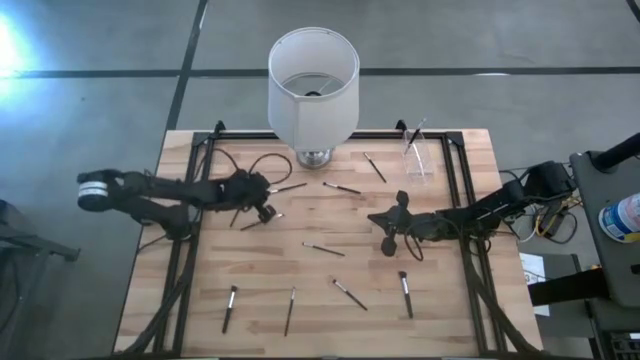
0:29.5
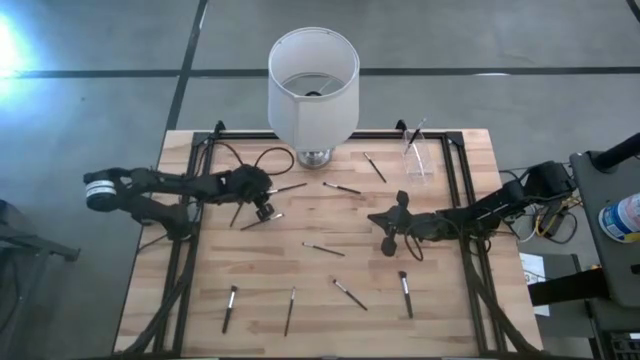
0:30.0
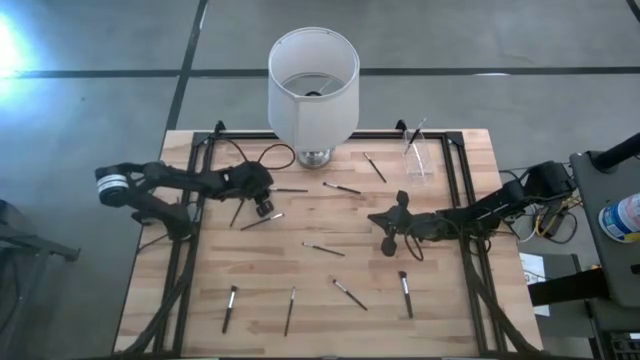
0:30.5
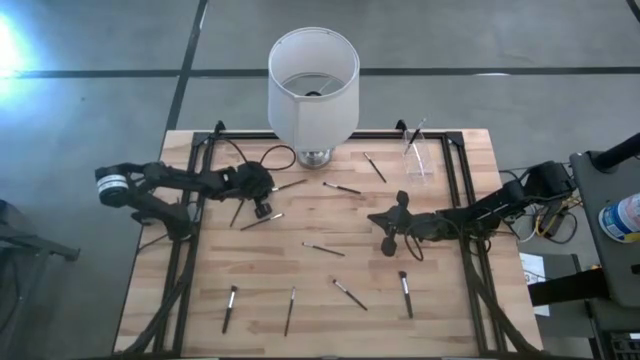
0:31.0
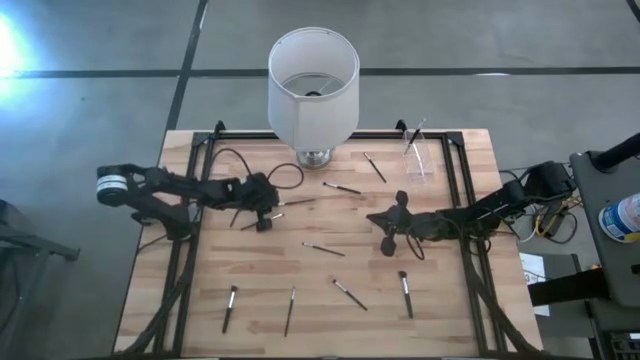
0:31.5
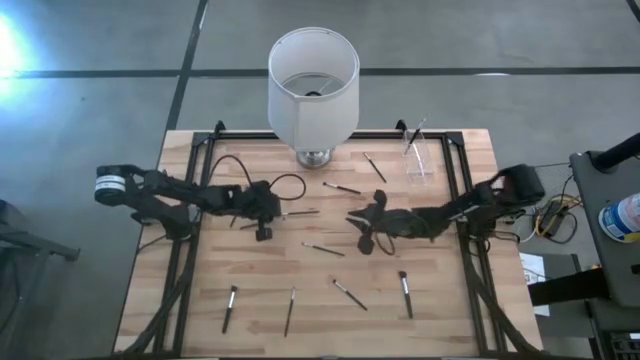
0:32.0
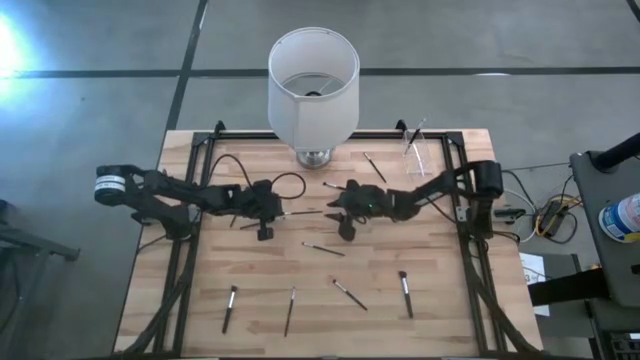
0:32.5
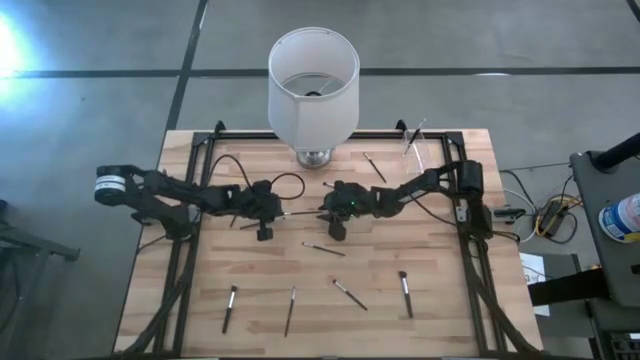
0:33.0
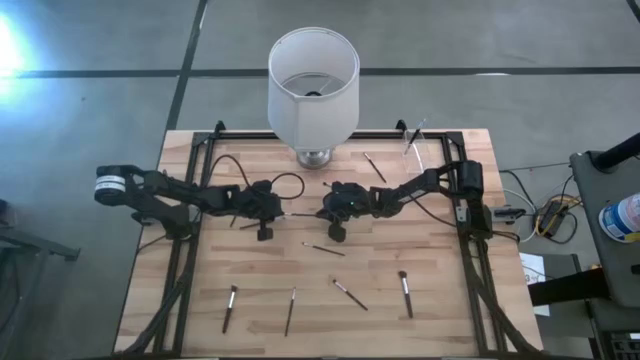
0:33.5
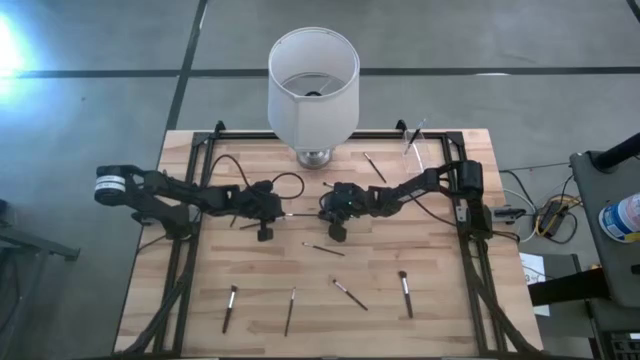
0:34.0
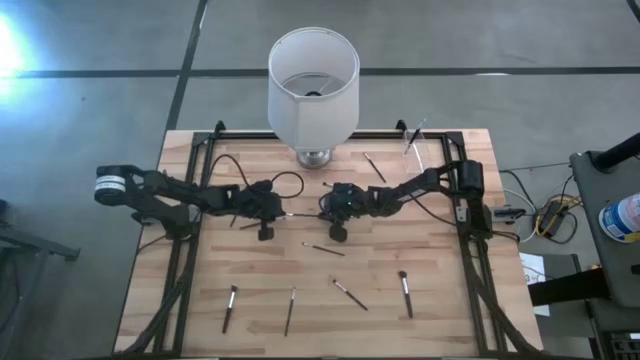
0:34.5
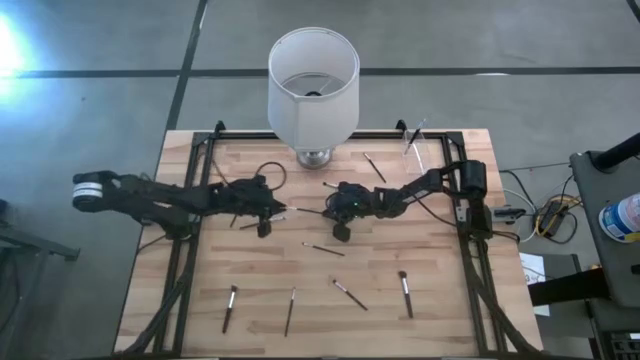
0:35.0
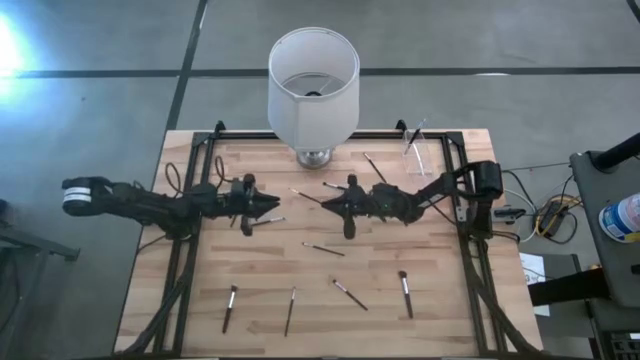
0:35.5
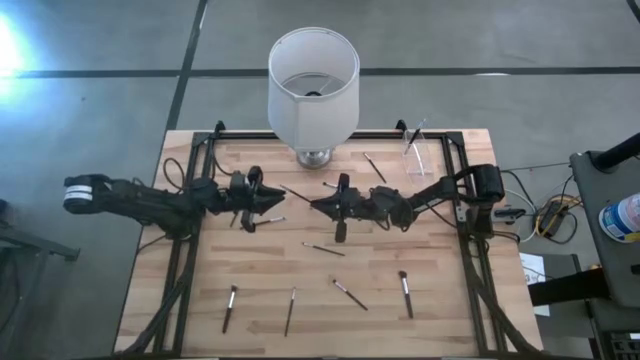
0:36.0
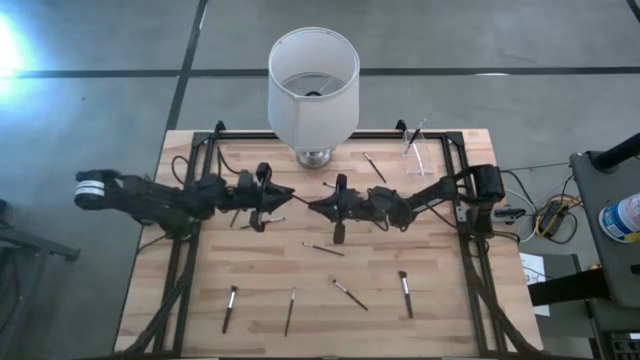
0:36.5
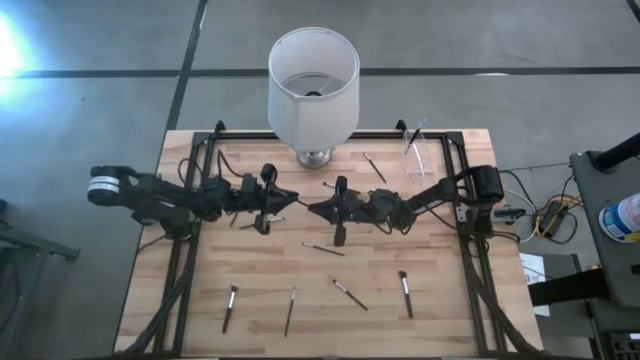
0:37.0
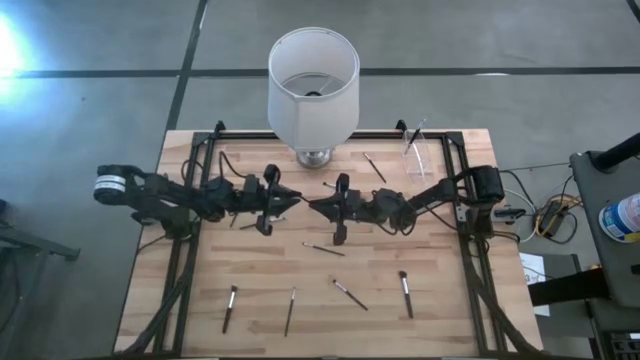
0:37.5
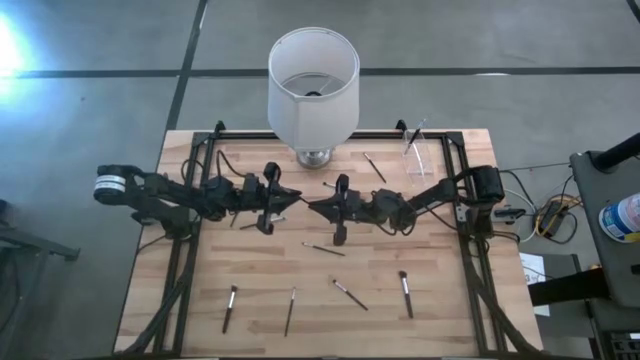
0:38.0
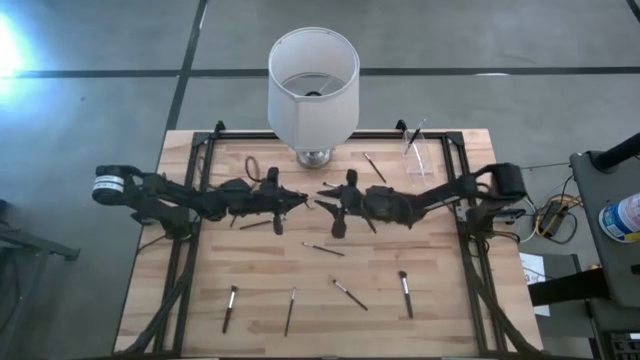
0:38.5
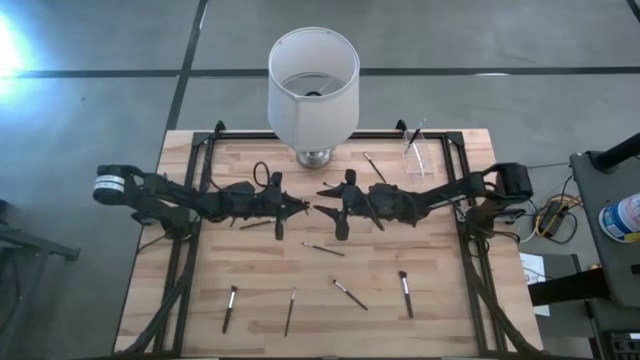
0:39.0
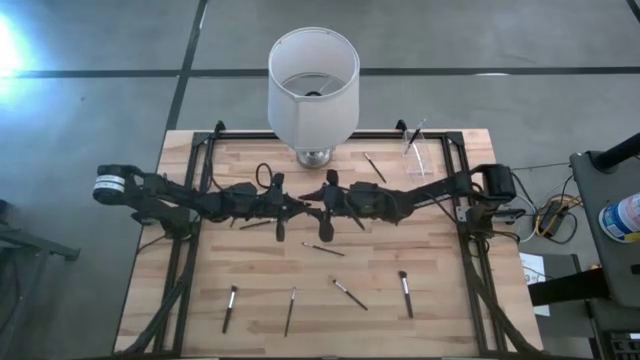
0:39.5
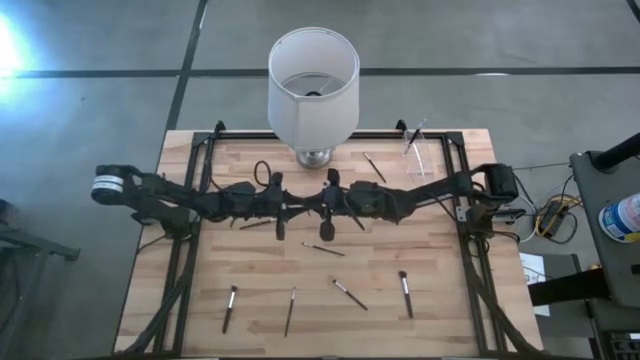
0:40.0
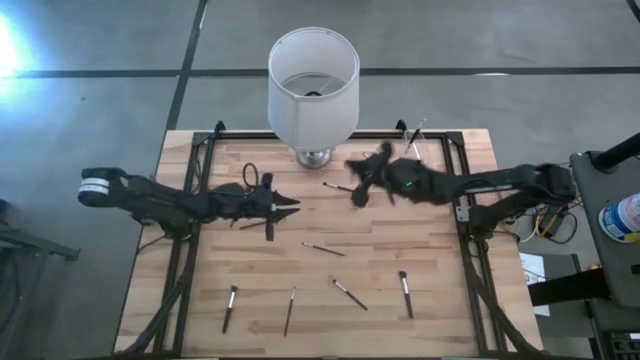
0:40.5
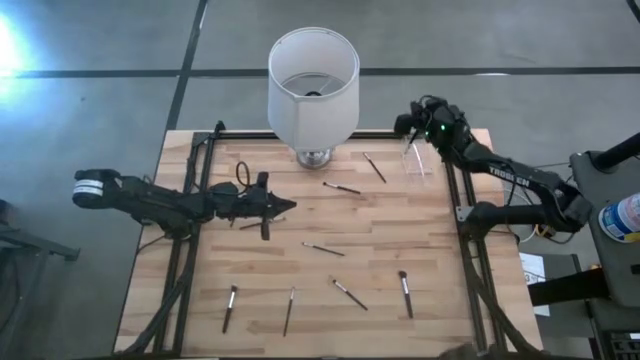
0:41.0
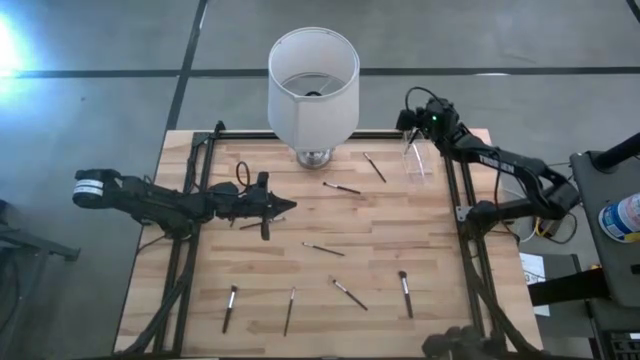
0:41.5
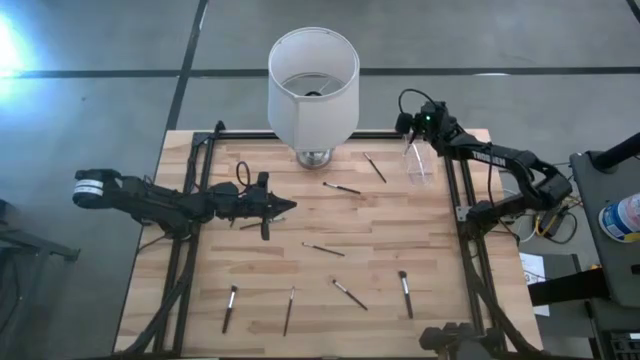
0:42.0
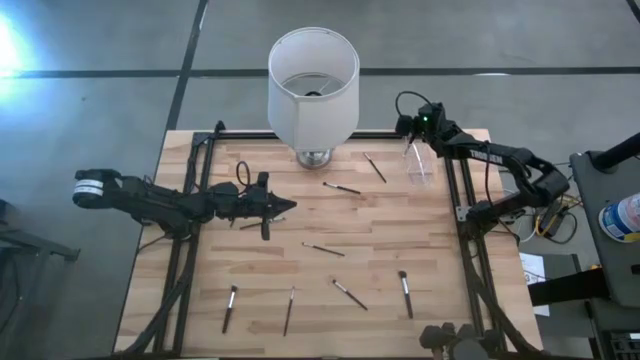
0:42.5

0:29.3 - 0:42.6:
Task: Put items in baskets/containers
Put the eyeshadow brush into the transparent organizer

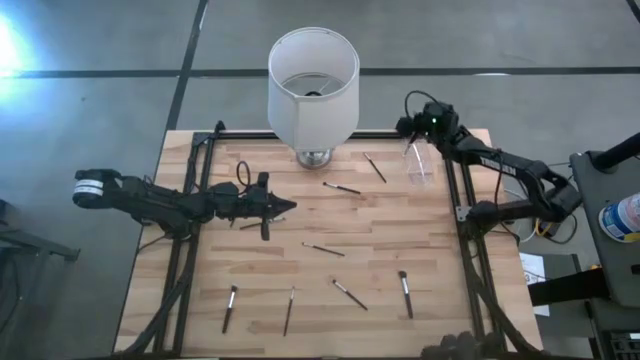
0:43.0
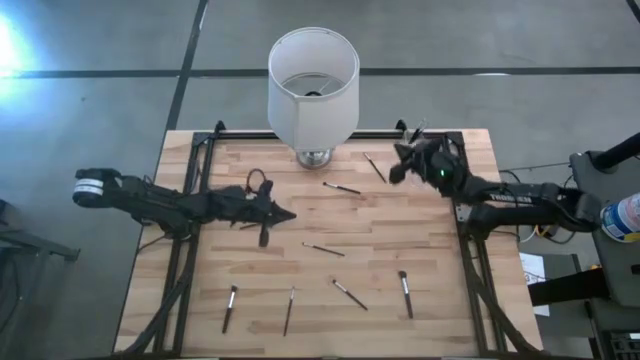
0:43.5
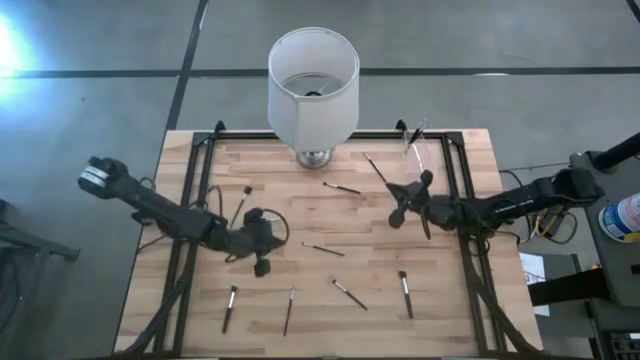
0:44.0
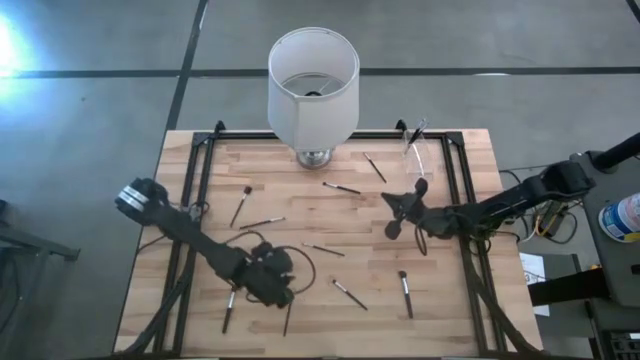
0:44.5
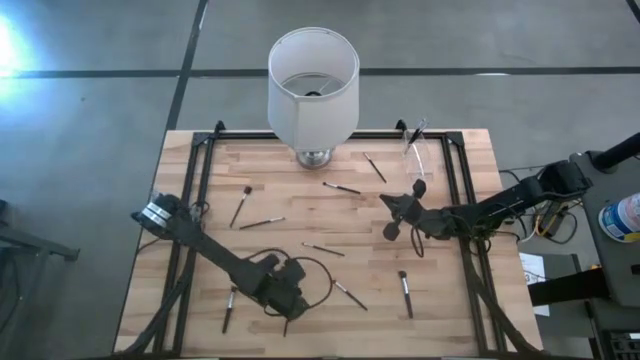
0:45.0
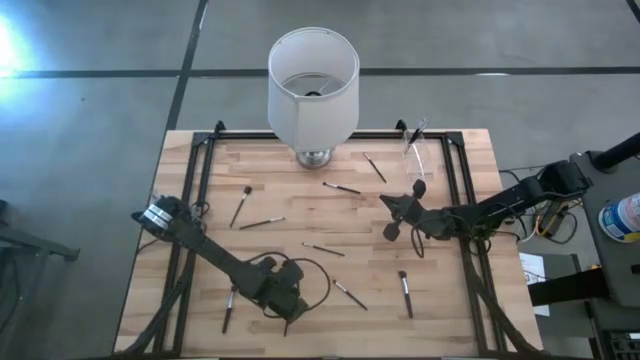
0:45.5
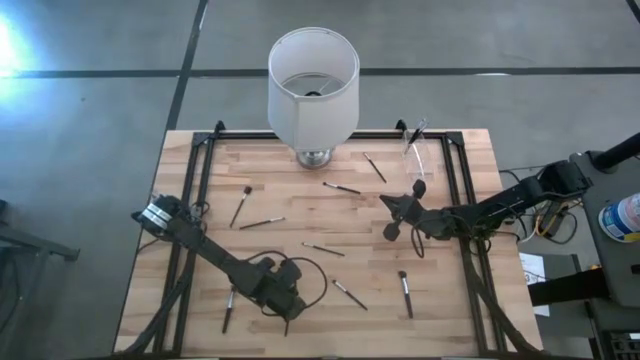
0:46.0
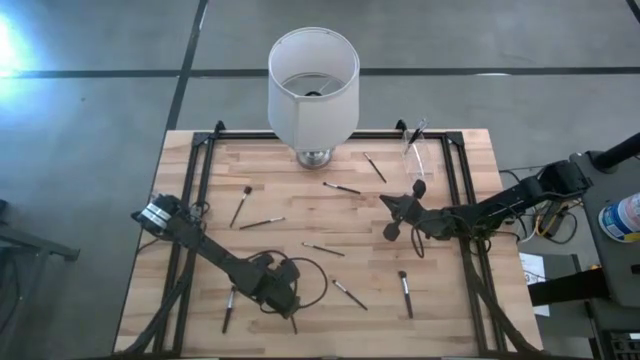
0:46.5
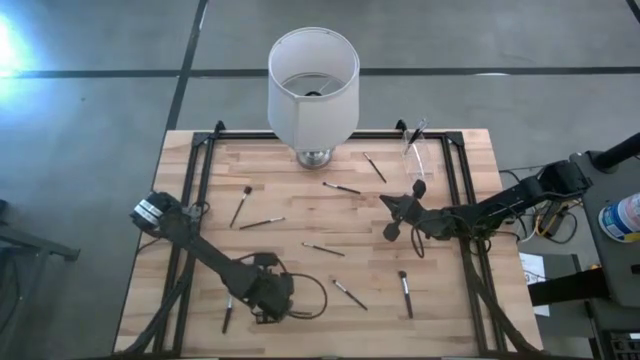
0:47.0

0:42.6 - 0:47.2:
Put the eyeshadow brush into the transparent organizer

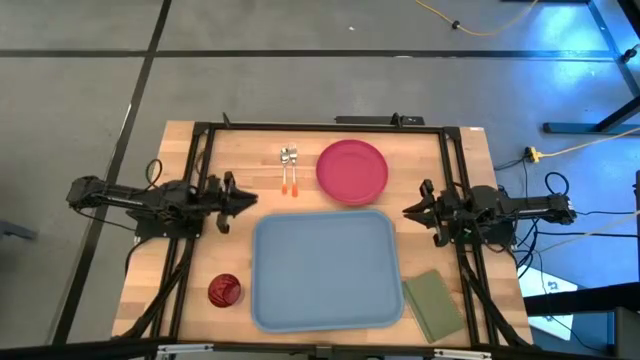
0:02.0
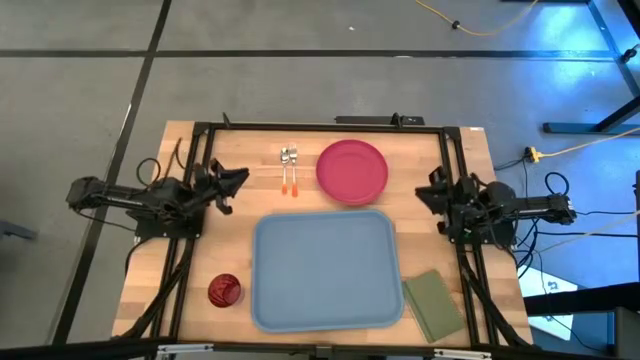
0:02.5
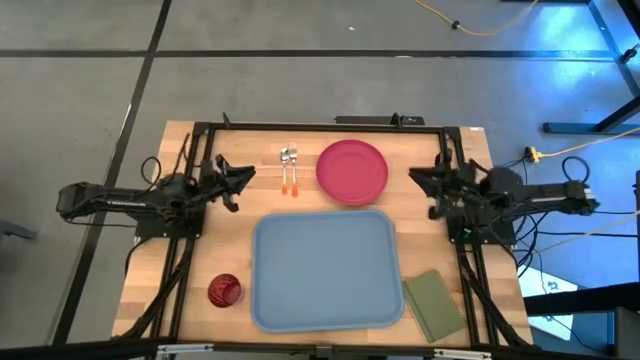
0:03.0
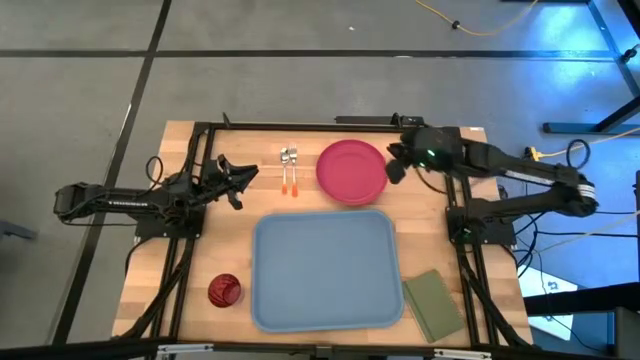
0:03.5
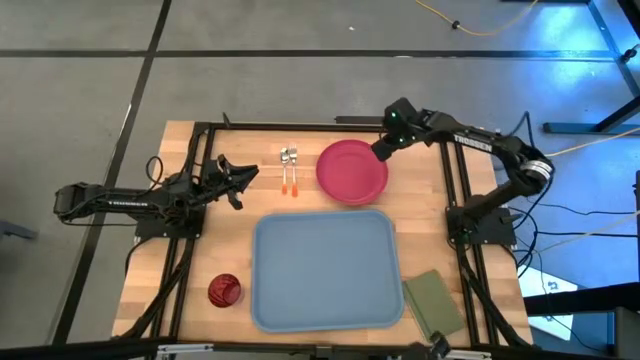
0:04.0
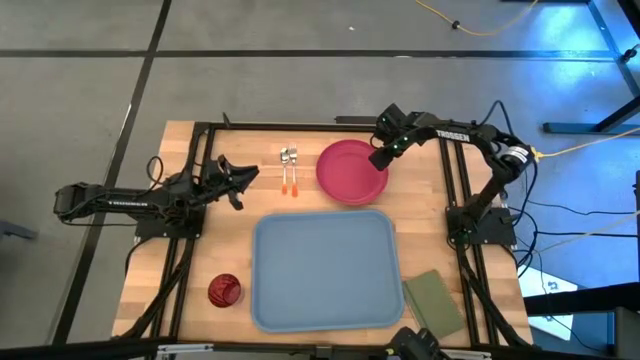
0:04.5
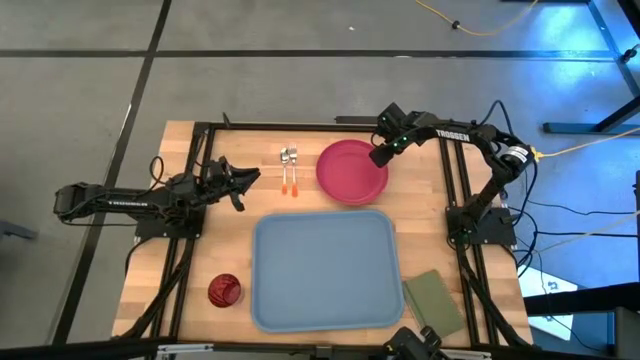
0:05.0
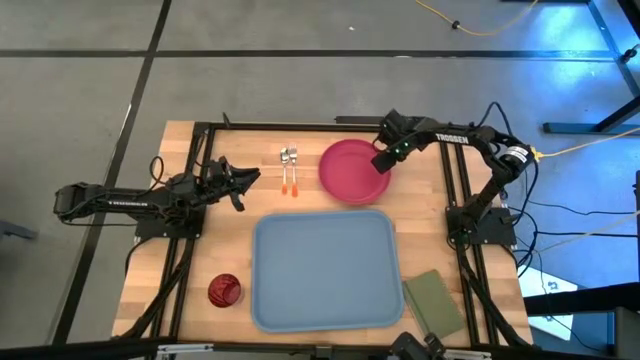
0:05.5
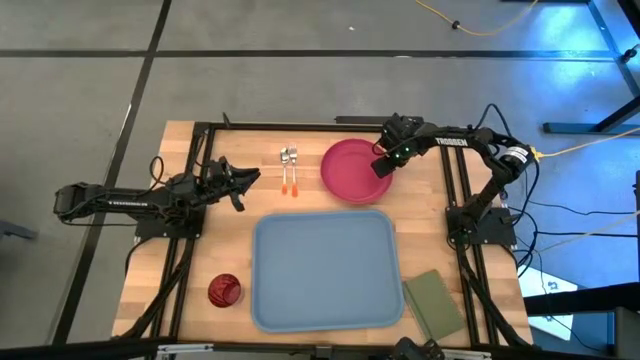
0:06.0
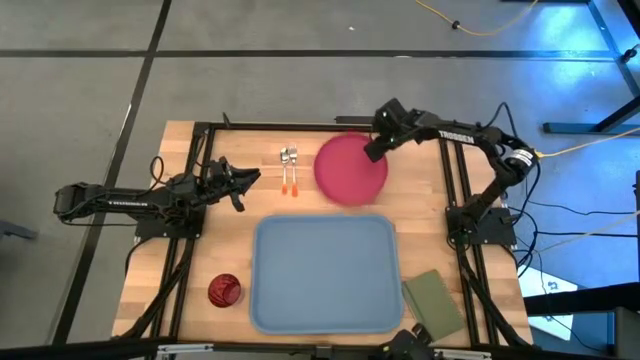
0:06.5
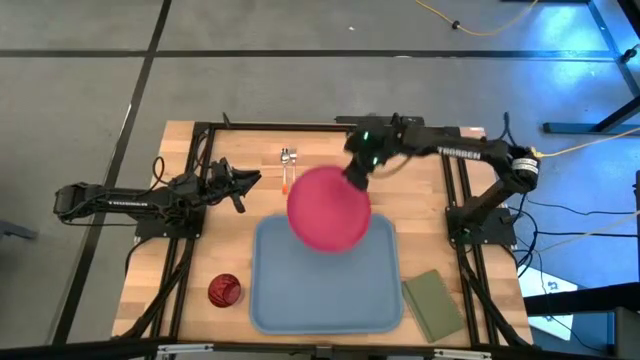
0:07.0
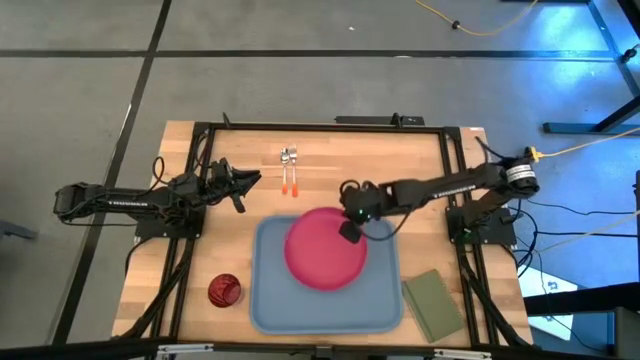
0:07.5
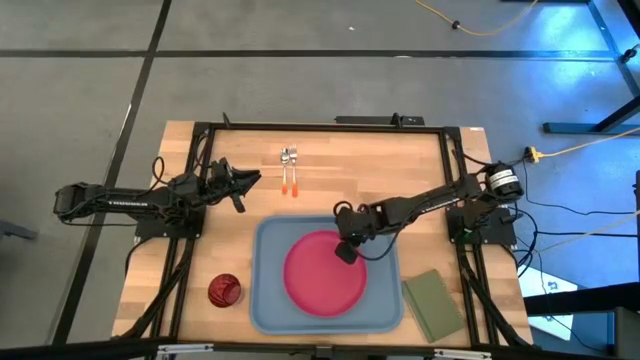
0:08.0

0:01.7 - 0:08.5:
Task: Pick and place plate/cup/fork/spoon on tray
Put the plate pink on the blue tray
